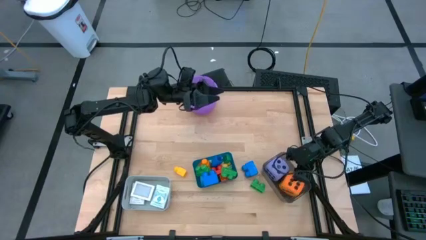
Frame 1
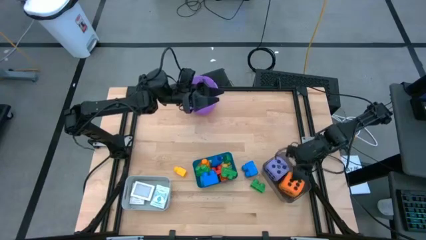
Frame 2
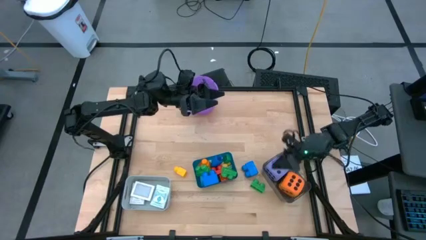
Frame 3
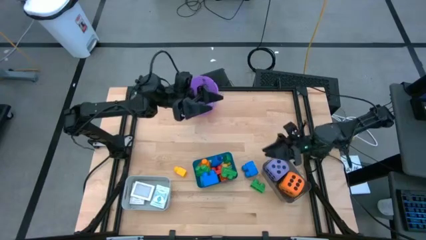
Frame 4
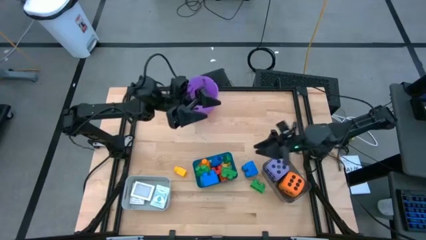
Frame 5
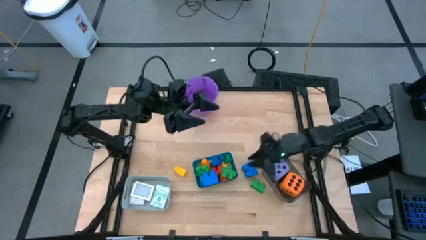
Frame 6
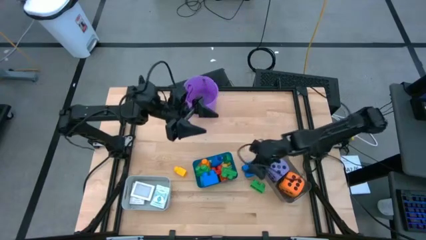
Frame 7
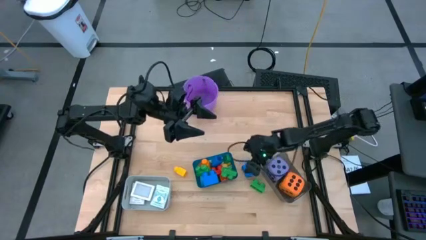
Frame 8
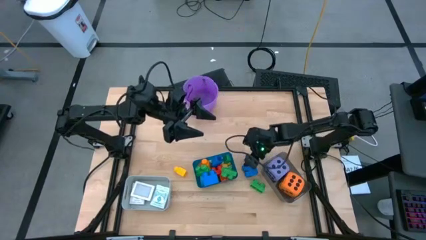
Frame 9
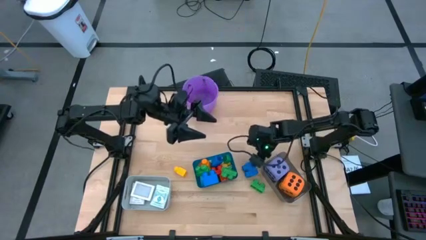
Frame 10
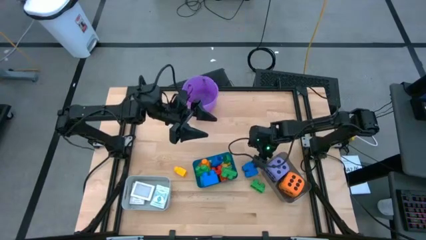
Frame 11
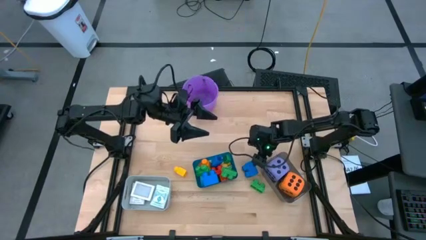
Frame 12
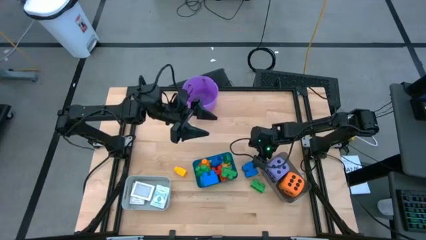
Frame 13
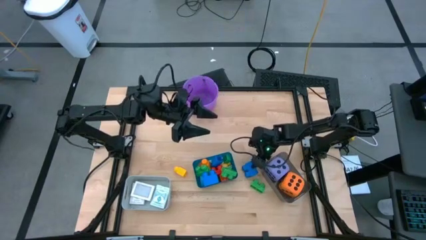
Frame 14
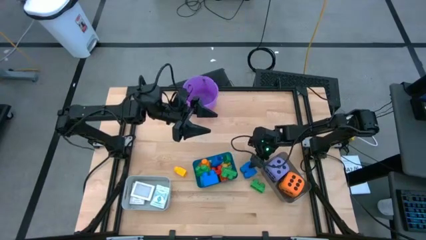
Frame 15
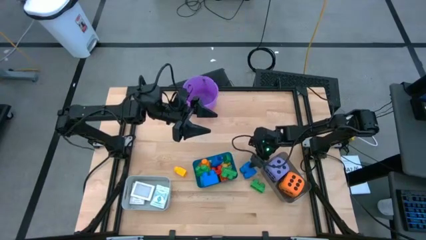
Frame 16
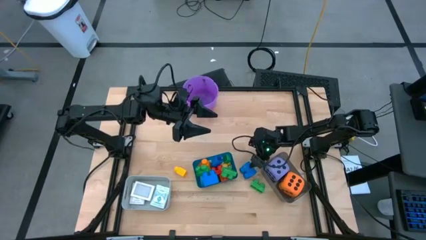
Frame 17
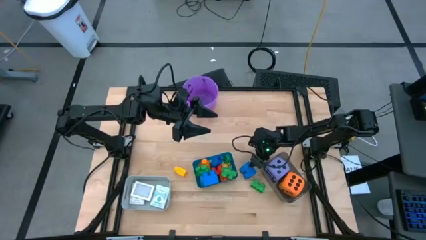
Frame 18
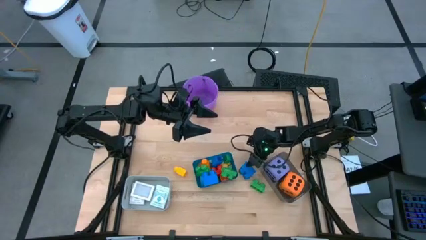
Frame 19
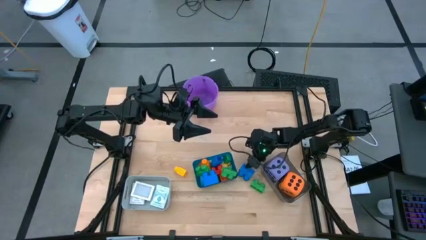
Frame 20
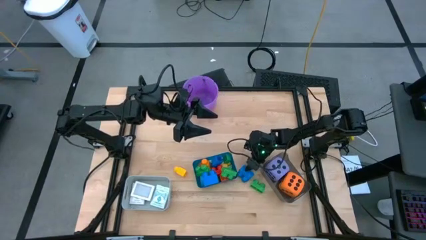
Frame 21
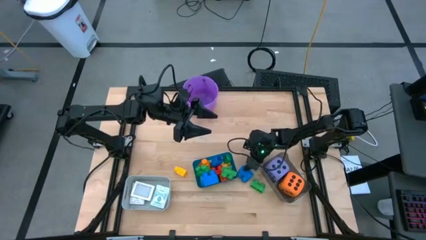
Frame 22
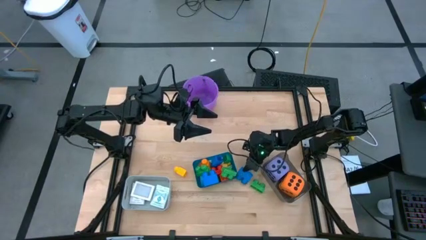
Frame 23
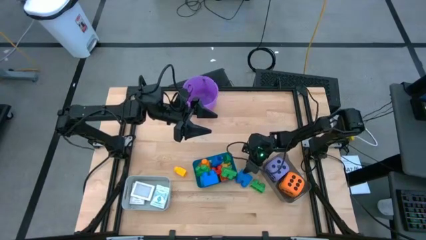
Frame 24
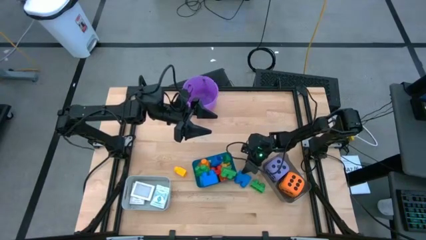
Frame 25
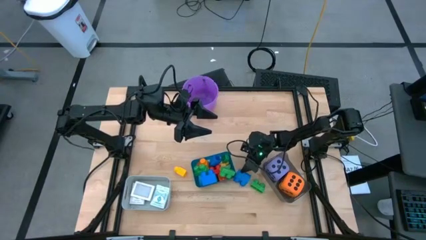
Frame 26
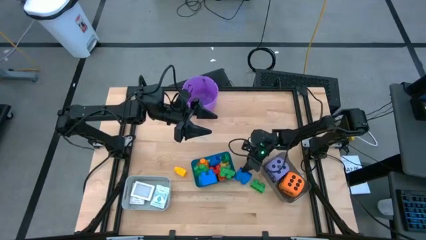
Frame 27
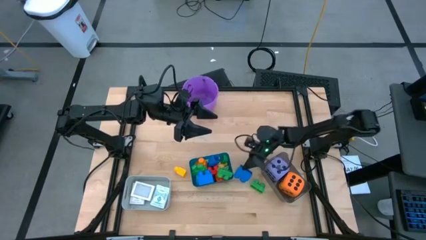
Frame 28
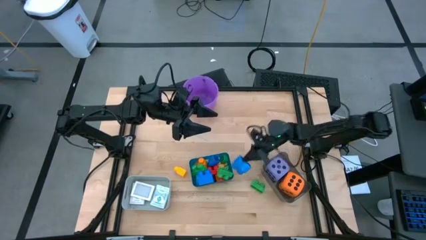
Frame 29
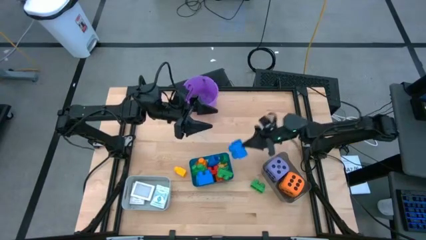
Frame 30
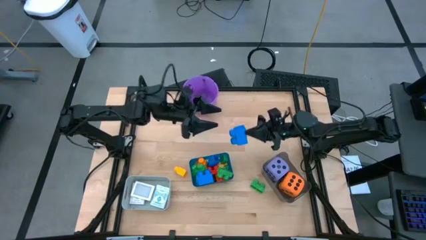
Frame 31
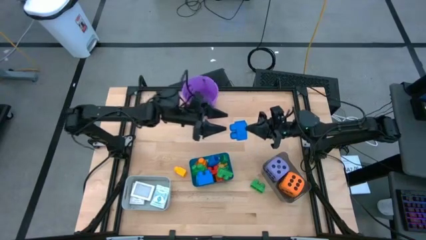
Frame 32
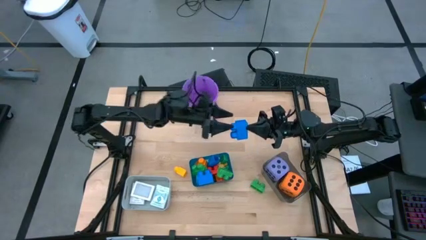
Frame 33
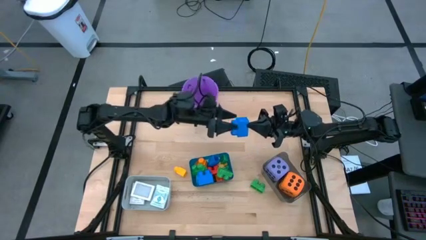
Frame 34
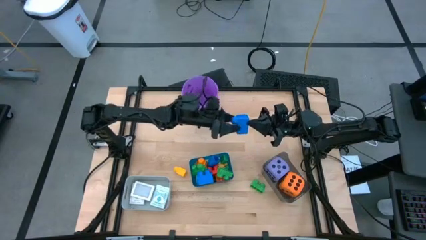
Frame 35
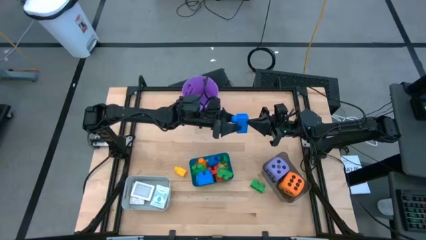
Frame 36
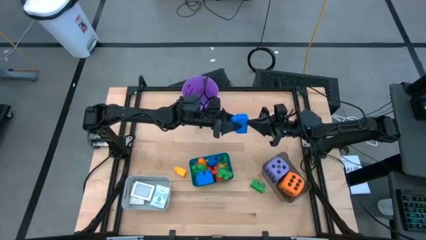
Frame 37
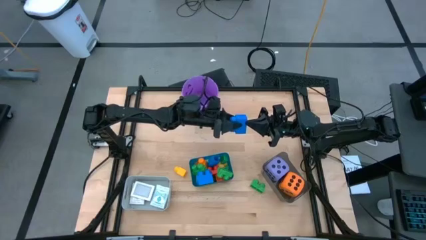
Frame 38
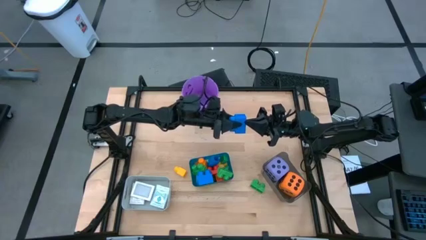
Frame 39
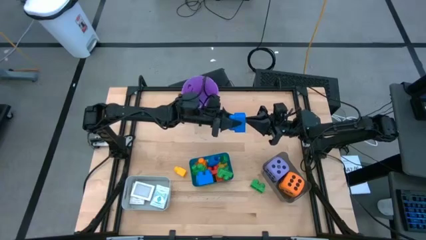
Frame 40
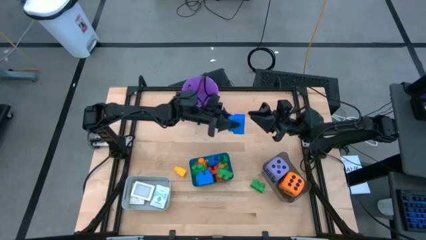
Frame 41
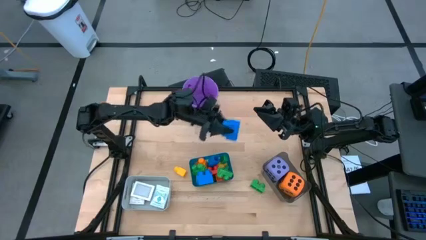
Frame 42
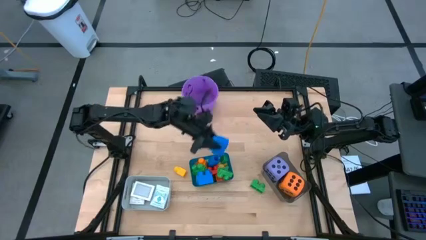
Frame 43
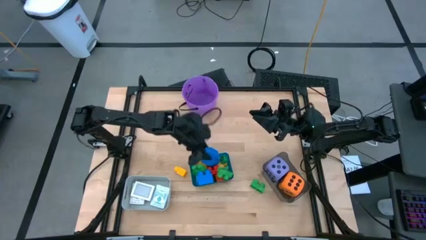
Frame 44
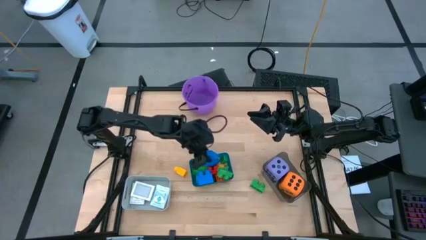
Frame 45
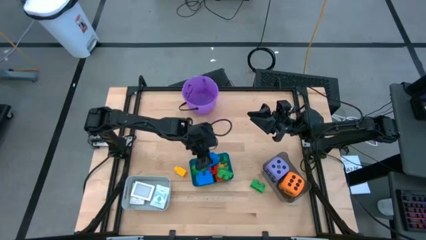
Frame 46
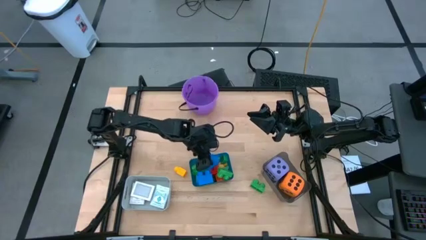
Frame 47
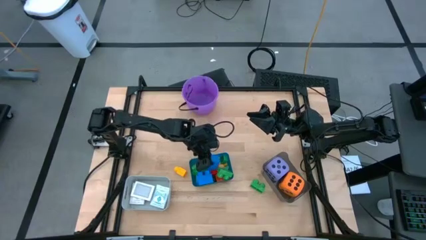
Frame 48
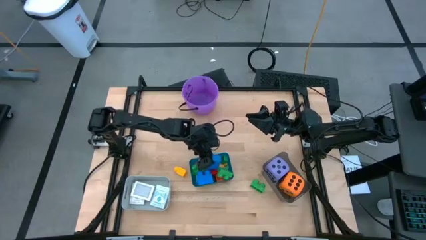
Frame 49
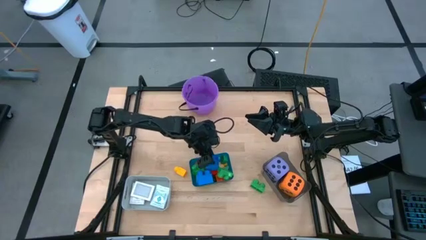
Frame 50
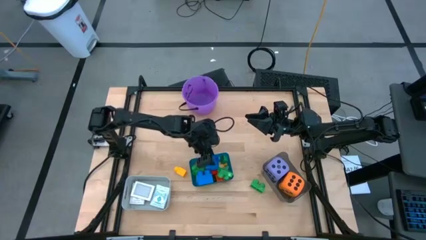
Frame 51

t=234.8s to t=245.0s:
Task: Pick & Place Toys
Put the blue game piece into the blue bin

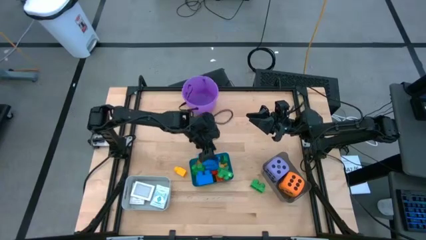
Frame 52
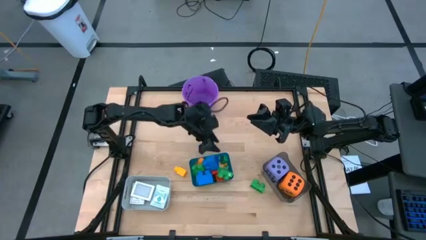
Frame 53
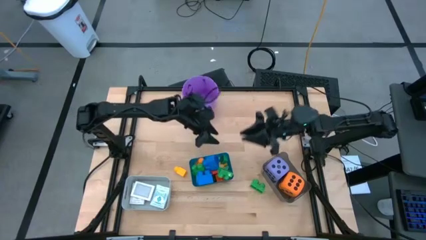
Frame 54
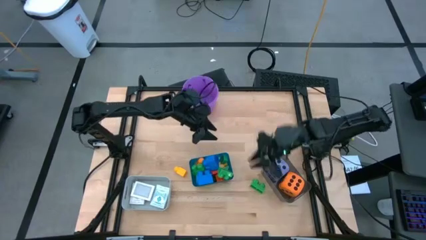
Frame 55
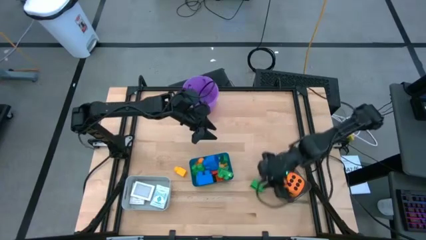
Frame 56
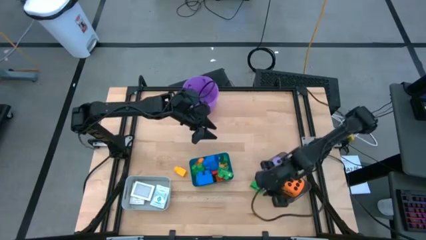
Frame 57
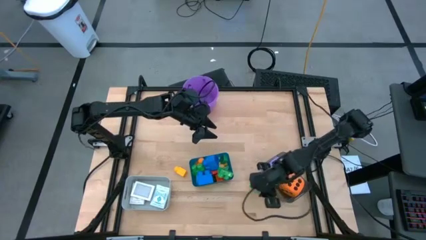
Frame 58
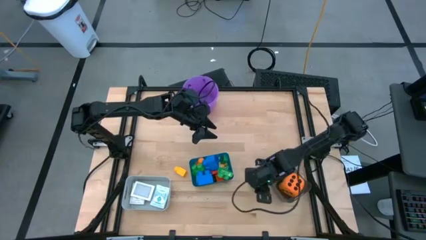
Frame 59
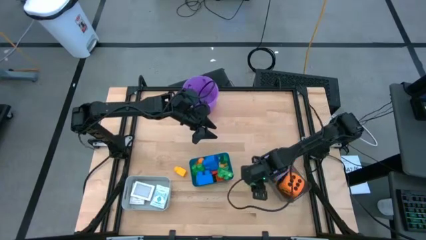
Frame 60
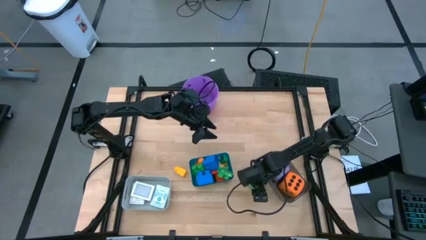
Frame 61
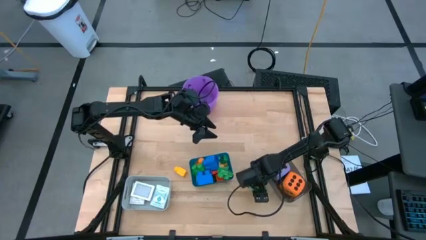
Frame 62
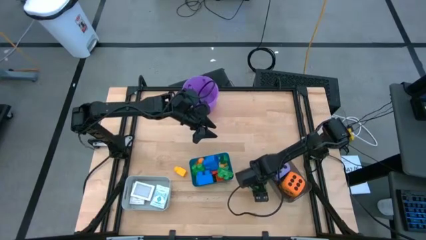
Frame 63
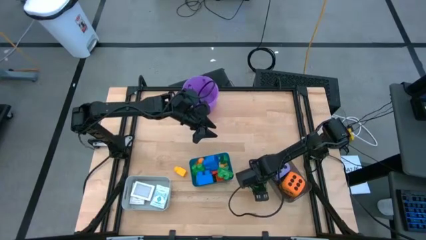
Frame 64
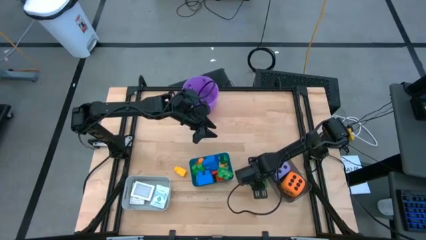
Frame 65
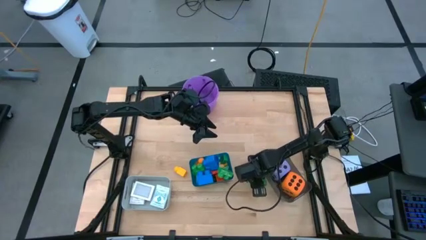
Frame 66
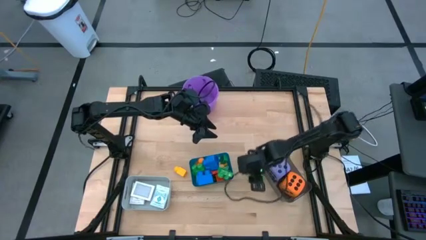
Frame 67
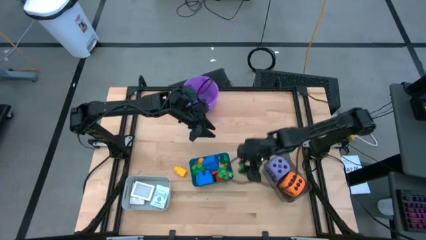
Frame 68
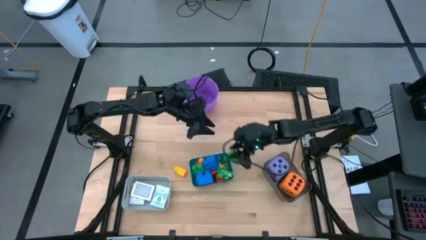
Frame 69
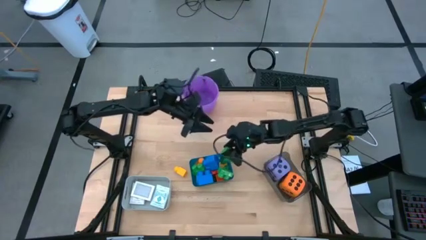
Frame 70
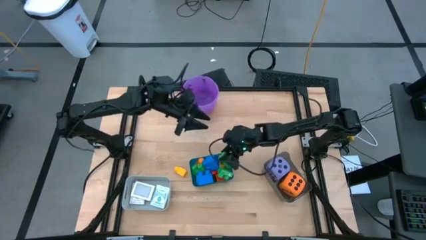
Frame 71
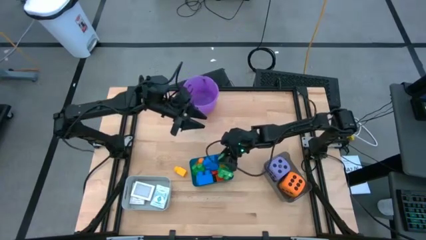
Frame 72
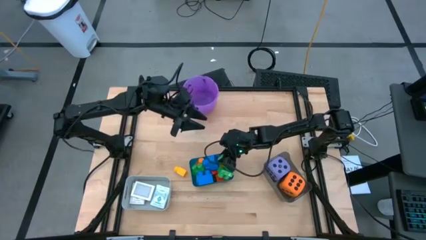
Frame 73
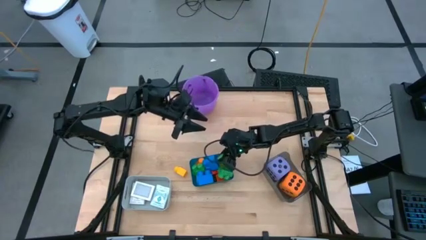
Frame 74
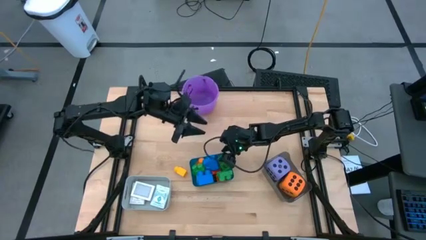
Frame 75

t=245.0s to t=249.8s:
Put the green game piece into the blue bin

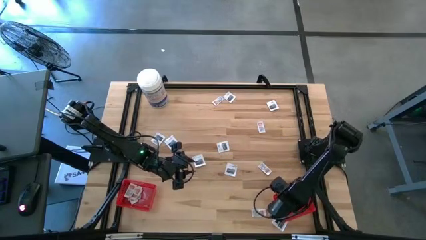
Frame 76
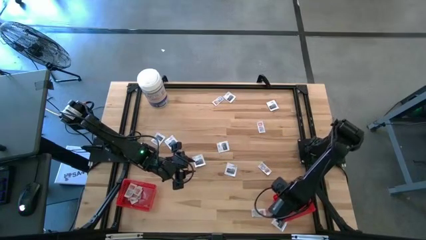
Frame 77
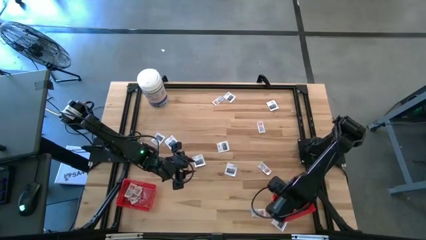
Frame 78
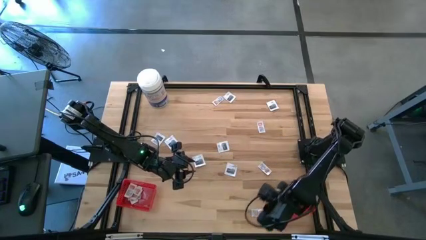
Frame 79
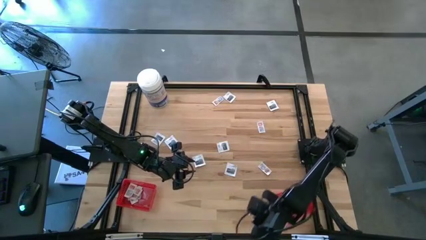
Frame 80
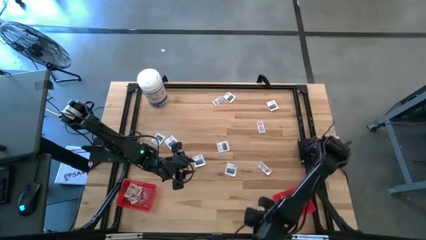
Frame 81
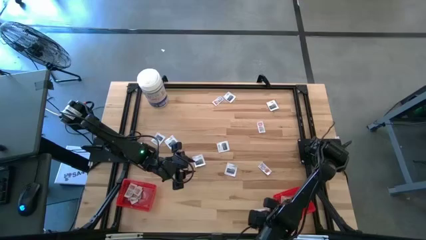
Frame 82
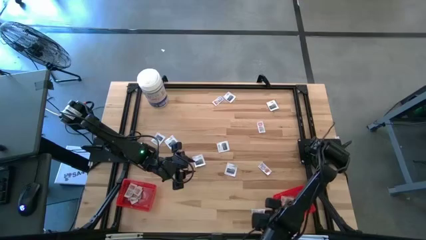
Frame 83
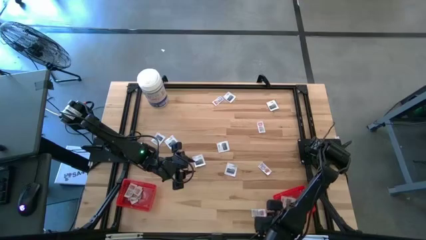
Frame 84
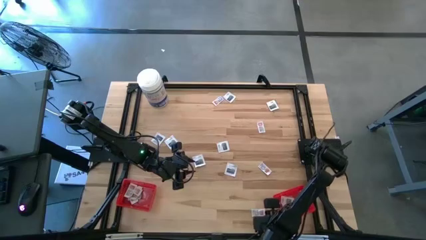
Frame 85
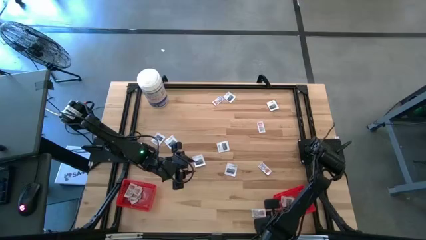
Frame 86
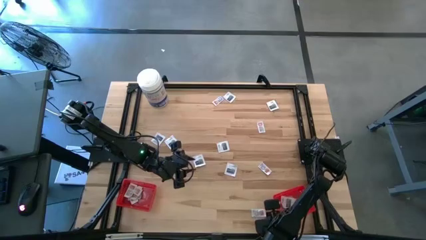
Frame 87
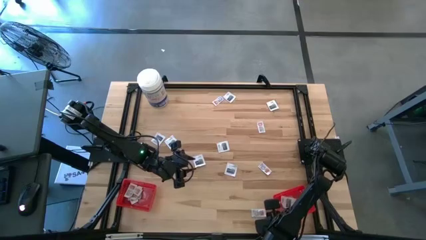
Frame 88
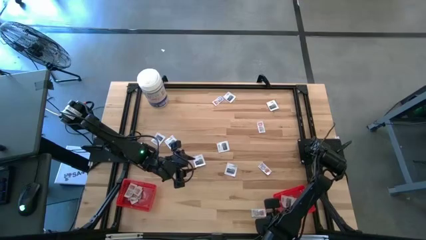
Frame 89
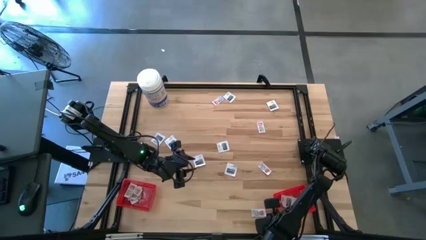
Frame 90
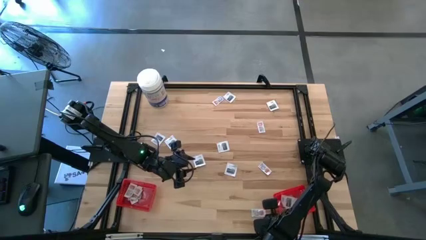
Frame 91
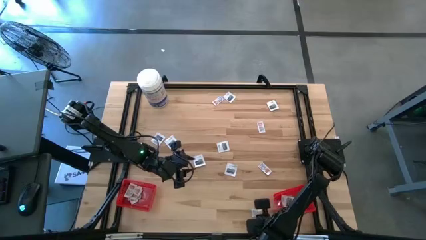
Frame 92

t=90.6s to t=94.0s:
Task: Pick & Place First Aid Supplies
Put the towelette pack into the right red bin
